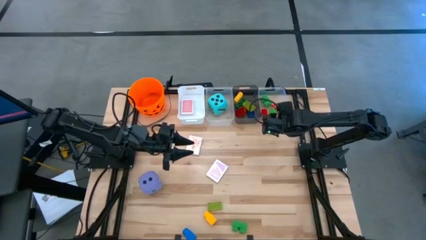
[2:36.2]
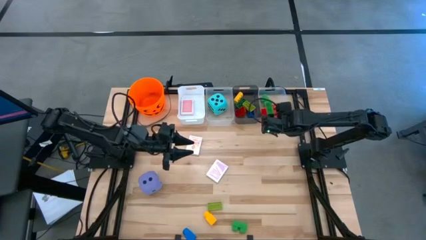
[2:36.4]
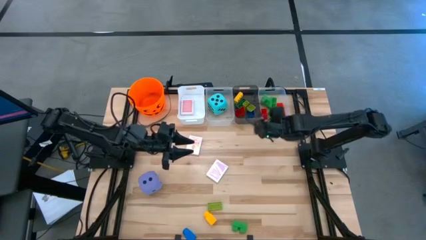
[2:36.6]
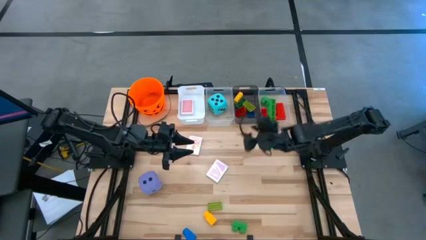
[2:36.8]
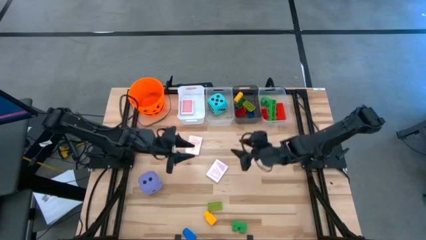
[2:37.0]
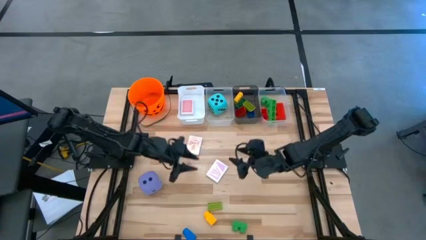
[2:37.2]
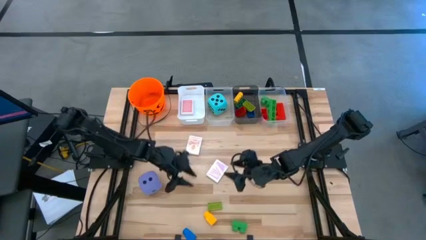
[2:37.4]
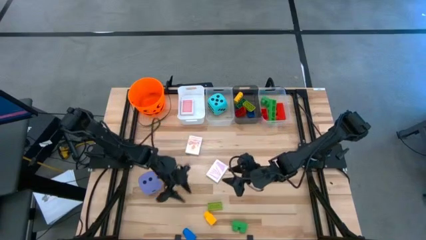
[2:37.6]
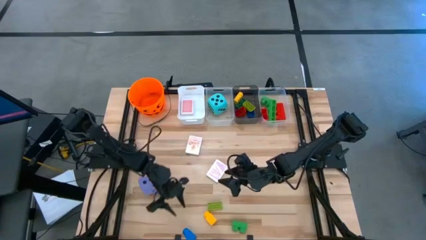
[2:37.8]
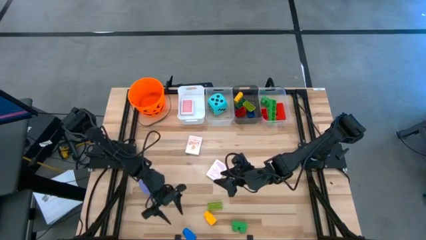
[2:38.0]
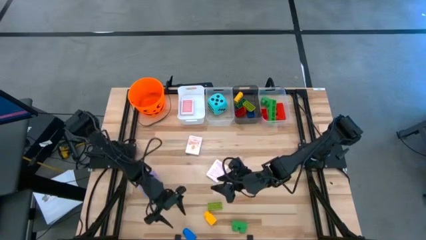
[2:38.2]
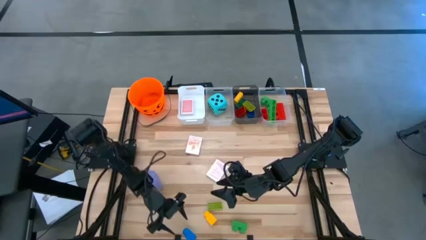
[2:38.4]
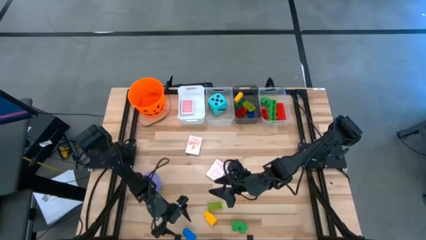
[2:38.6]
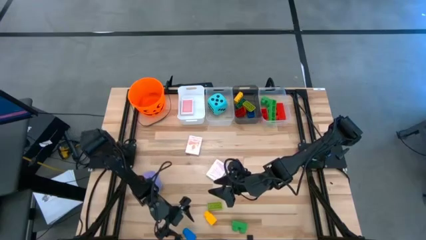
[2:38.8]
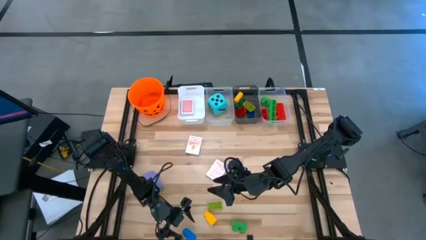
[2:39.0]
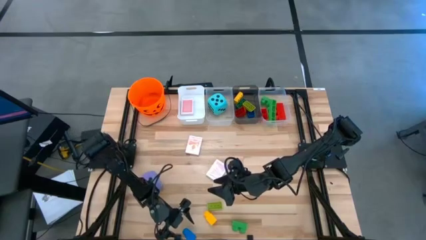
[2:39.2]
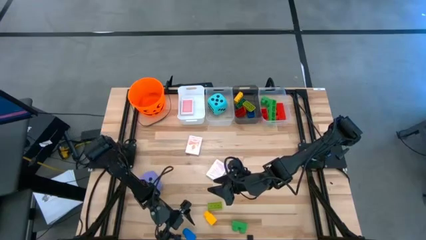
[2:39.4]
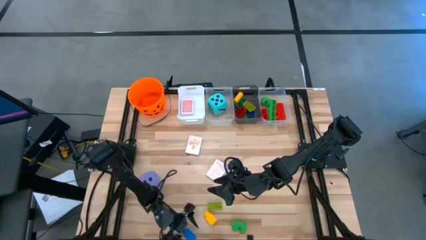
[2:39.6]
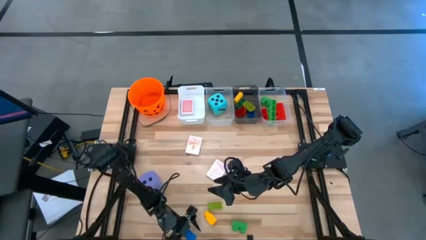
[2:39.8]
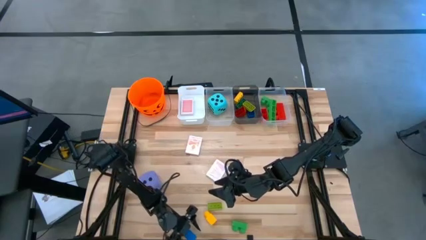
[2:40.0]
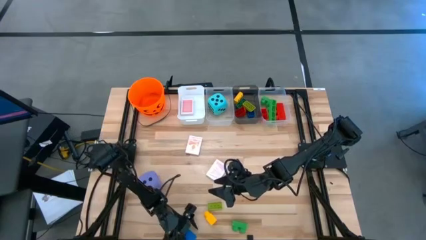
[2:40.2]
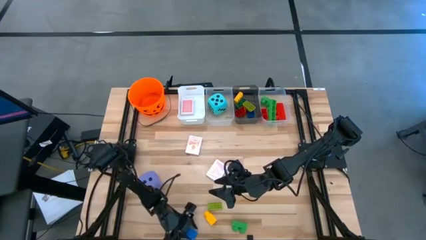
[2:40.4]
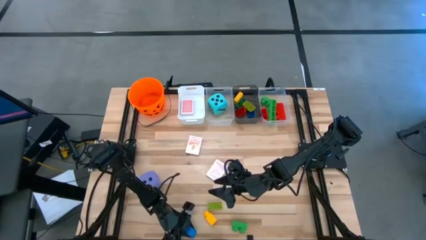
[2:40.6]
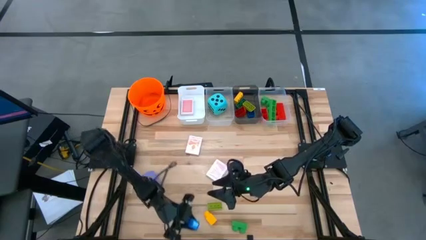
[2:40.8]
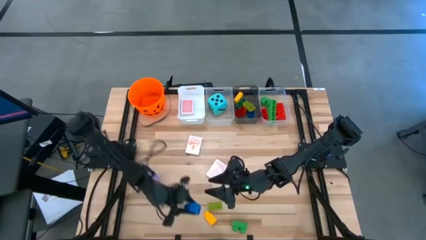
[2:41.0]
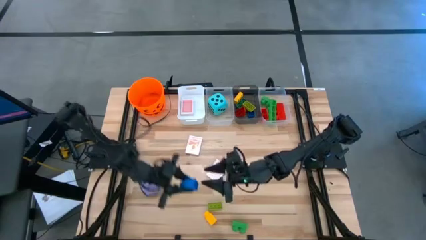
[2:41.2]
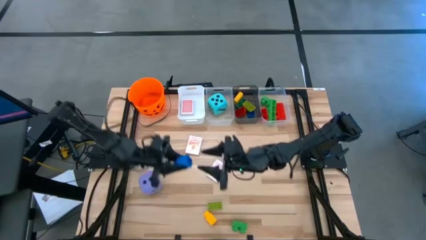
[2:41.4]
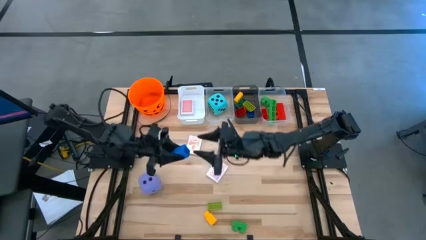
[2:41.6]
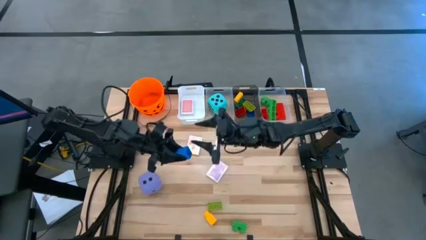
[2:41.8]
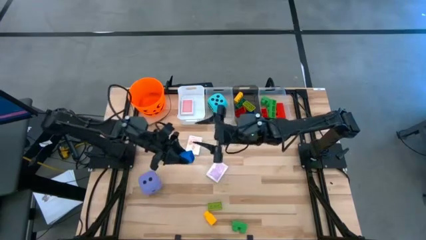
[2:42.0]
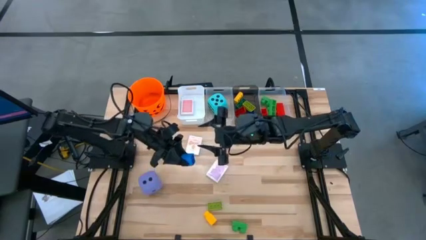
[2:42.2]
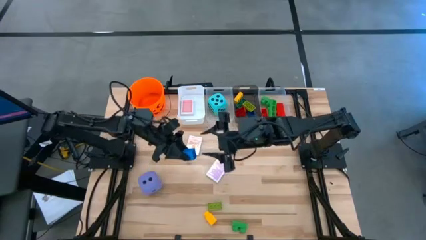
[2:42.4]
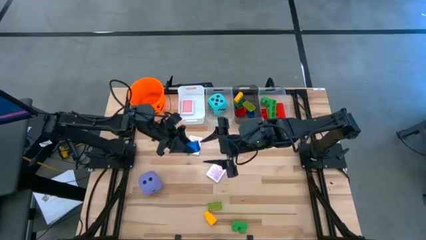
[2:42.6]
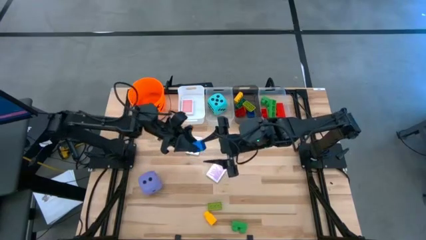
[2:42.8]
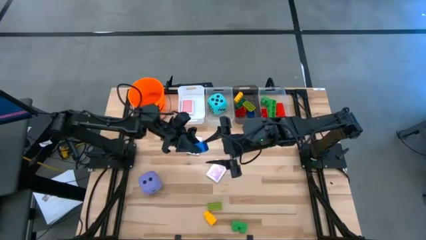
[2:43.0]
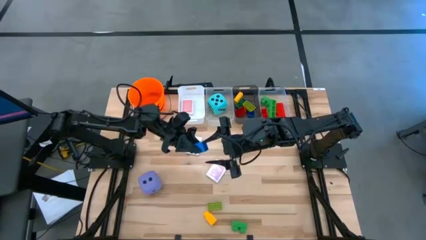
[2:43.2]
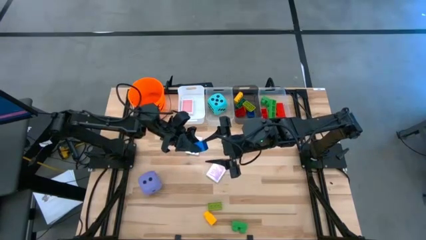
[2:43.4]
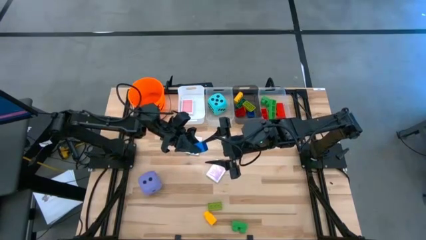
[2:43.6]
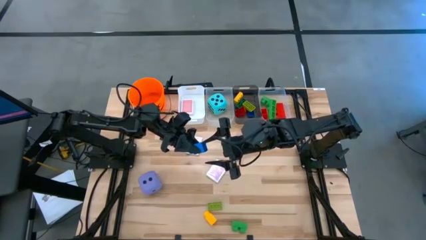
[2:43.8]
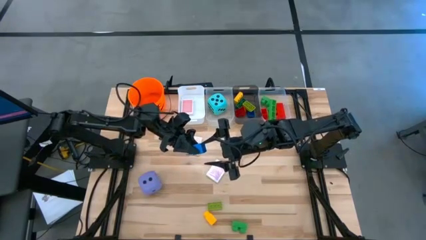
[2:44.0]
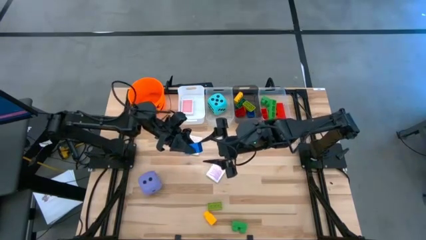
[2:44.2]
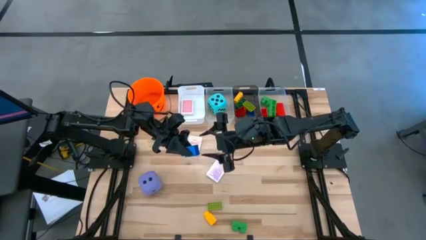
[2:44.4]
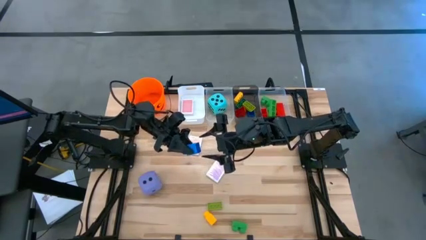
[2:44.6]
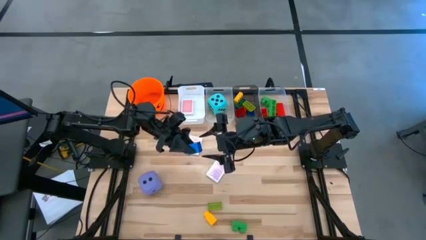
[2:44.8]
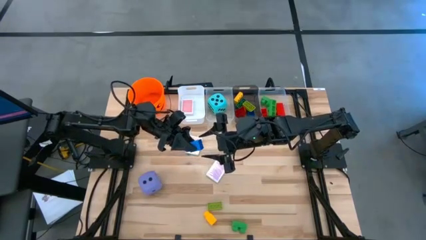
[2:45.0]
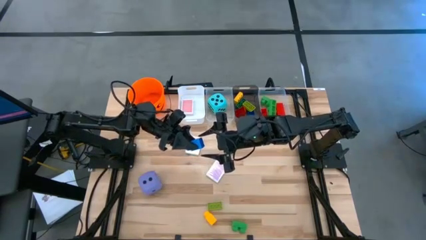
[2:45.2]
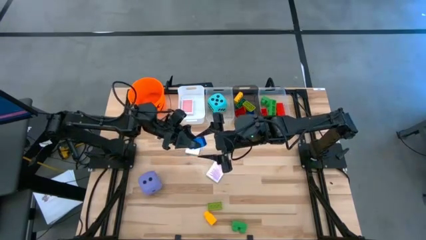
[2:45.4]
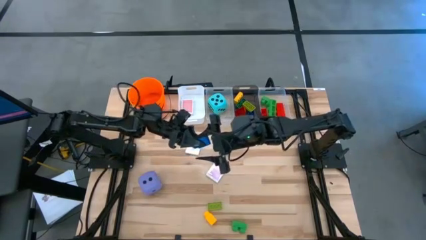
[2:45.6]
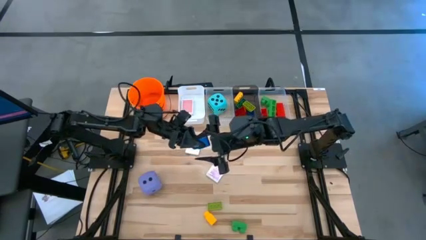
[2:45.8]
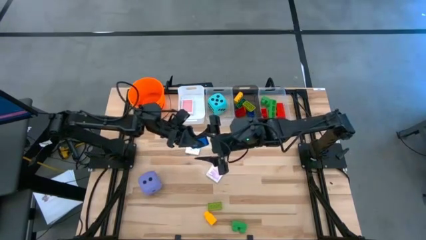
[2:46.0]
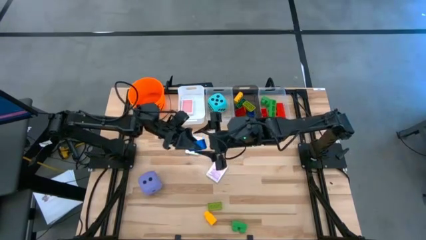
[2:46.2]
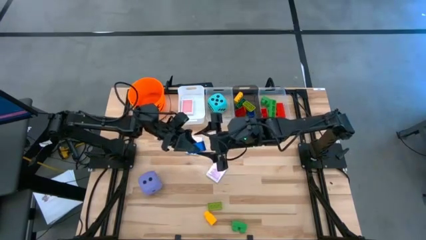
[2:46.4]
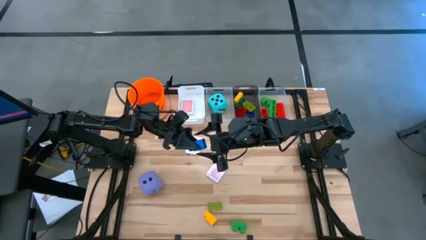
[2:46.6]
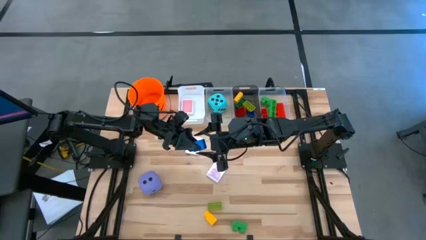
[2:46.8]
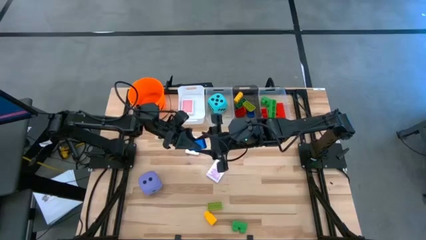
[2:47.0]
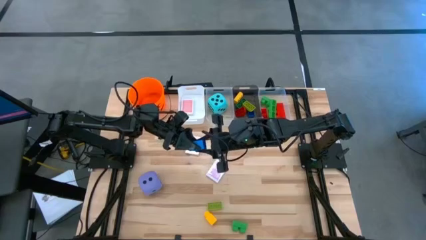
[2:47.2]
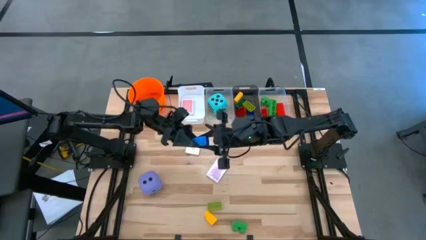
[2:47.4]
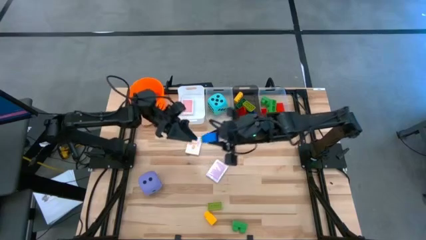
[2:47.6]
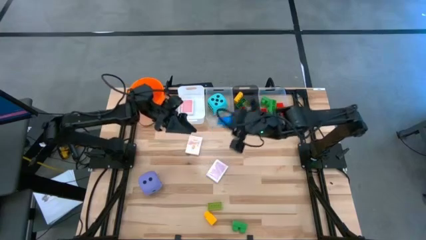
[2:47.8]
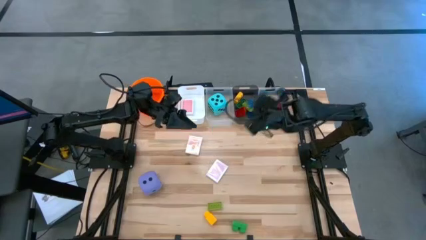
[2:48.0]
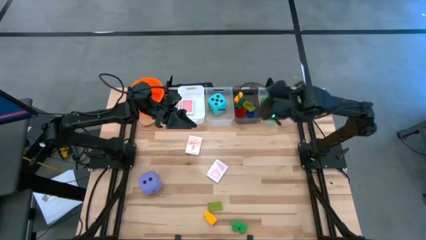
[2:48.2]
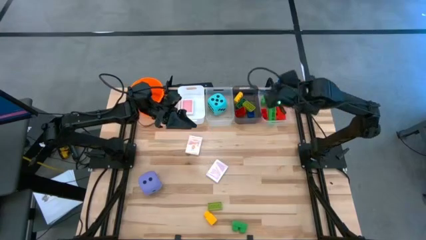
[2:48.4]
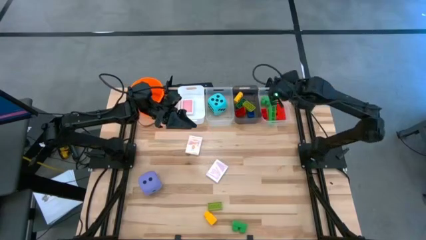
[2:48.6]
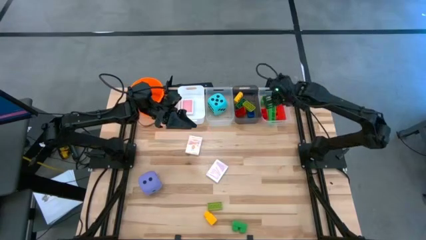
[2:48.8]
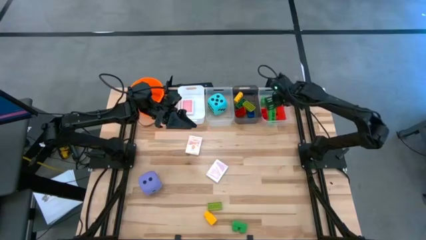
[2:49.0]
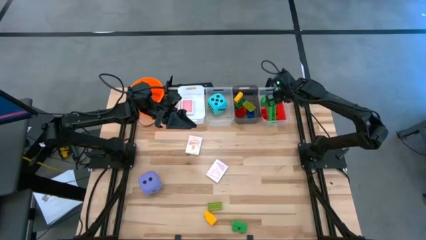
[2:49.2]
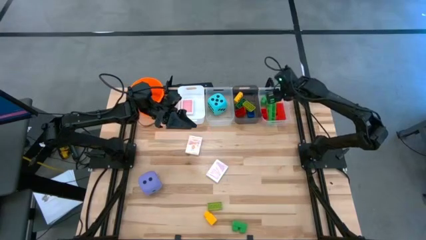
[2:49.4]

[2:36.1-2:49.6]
Task: Pick & Place Toys
Put the large blue game piece into the right transparent bin
